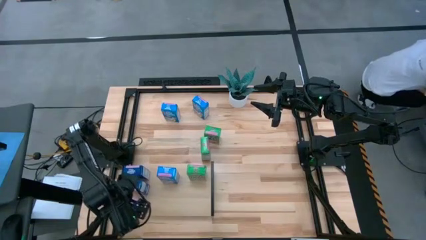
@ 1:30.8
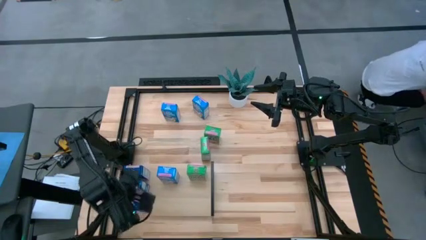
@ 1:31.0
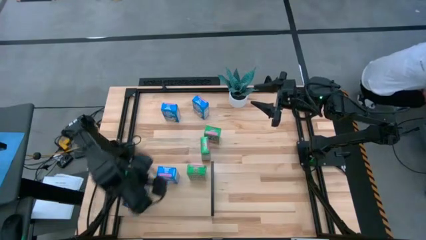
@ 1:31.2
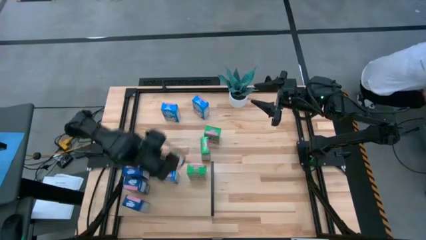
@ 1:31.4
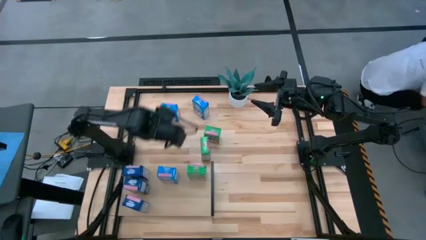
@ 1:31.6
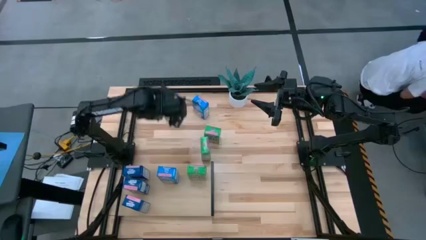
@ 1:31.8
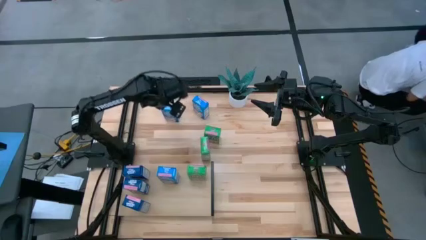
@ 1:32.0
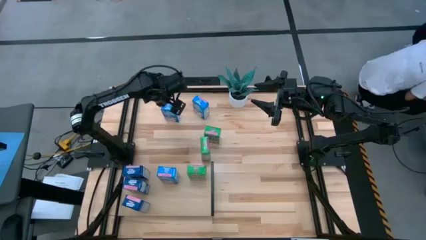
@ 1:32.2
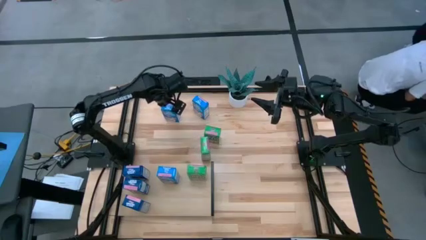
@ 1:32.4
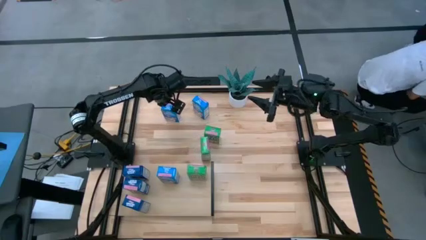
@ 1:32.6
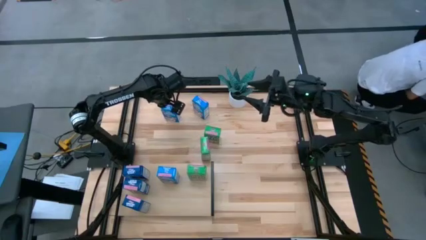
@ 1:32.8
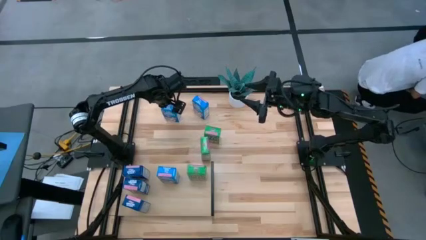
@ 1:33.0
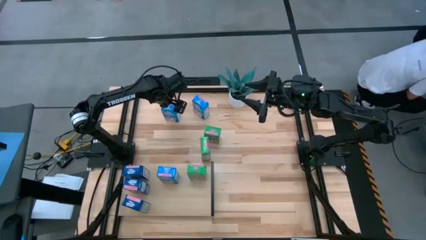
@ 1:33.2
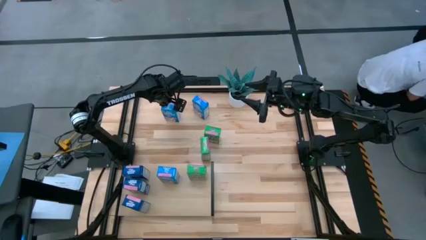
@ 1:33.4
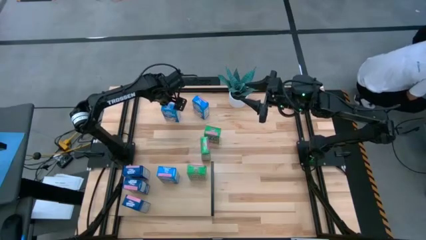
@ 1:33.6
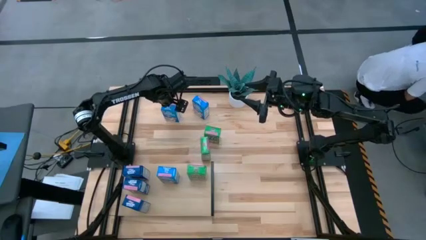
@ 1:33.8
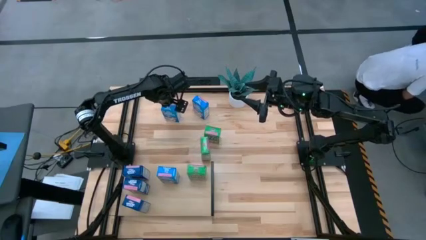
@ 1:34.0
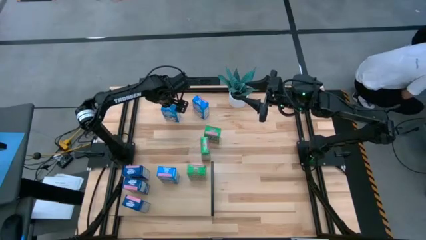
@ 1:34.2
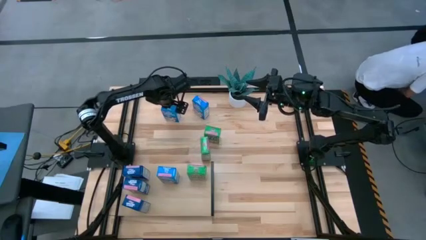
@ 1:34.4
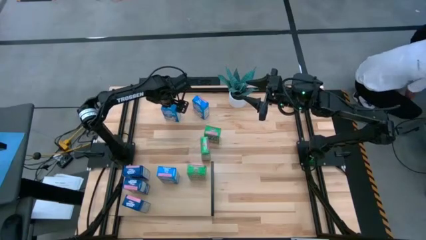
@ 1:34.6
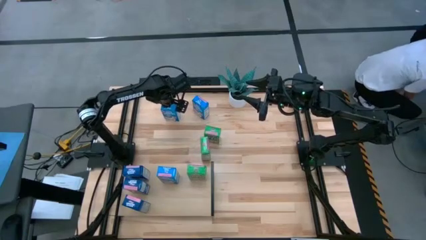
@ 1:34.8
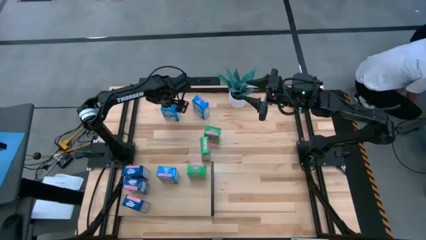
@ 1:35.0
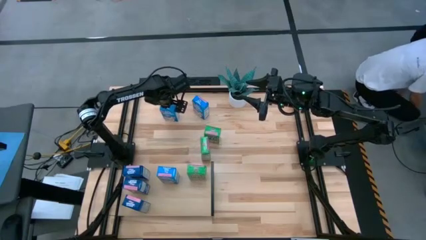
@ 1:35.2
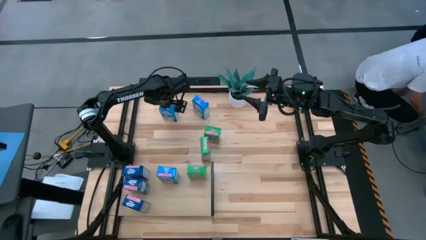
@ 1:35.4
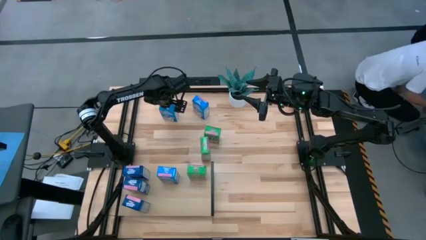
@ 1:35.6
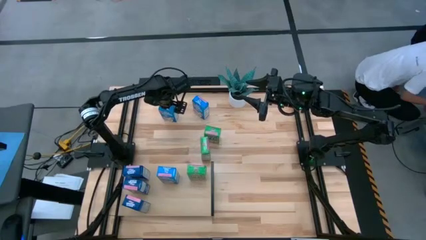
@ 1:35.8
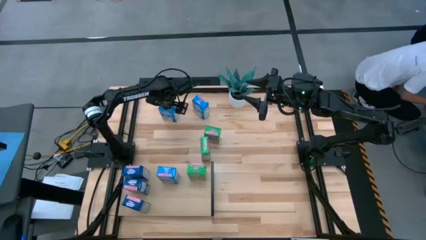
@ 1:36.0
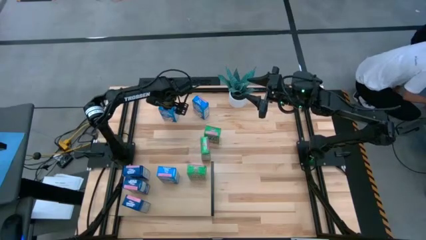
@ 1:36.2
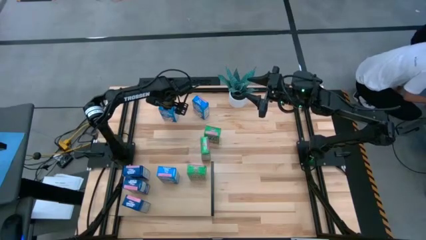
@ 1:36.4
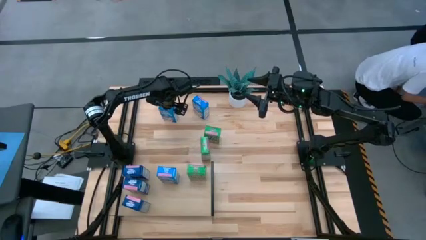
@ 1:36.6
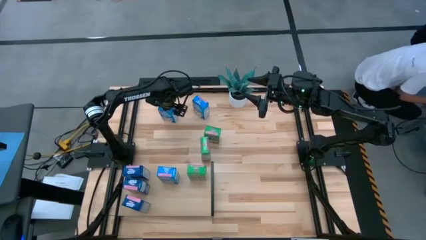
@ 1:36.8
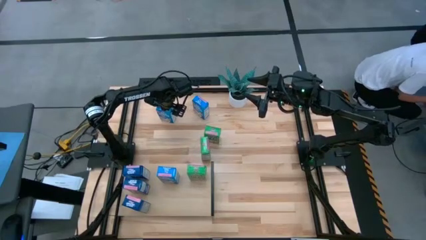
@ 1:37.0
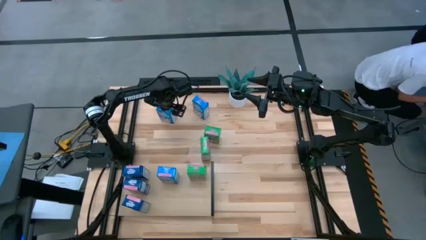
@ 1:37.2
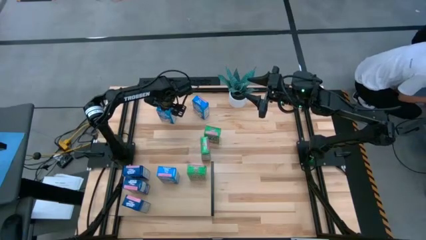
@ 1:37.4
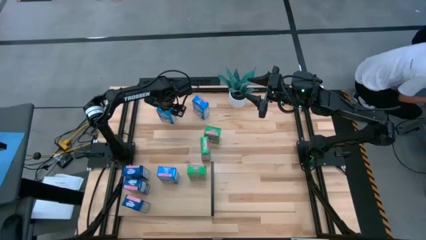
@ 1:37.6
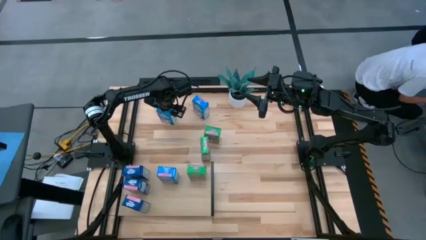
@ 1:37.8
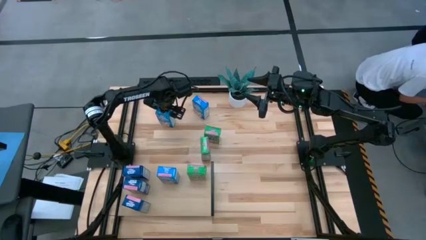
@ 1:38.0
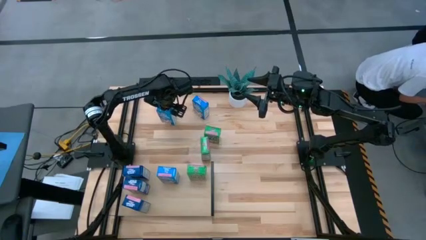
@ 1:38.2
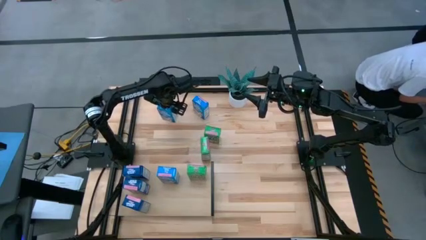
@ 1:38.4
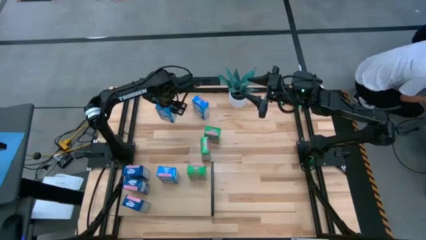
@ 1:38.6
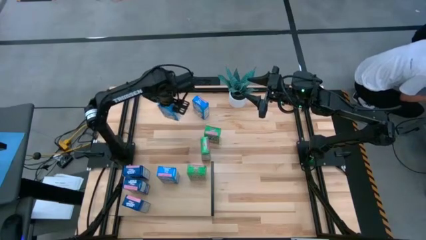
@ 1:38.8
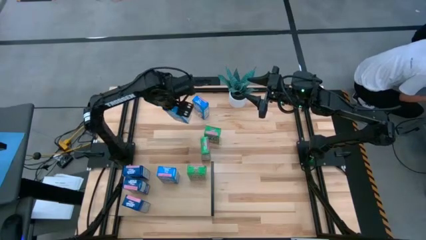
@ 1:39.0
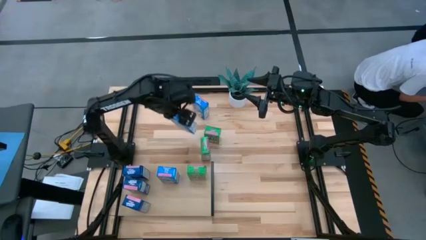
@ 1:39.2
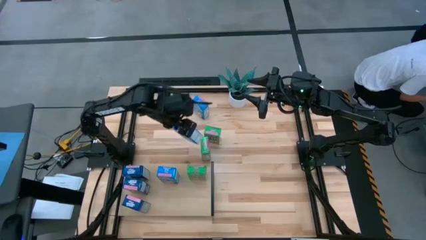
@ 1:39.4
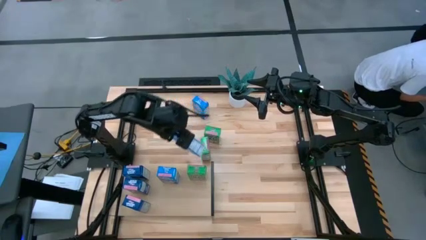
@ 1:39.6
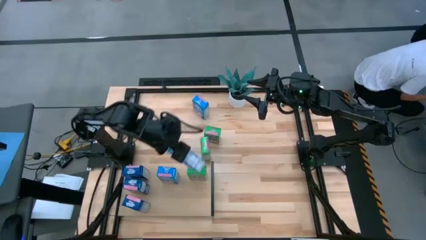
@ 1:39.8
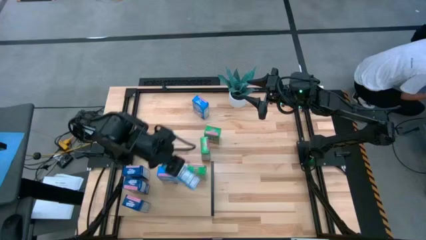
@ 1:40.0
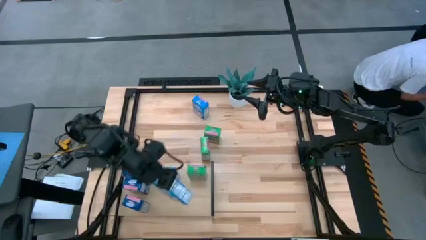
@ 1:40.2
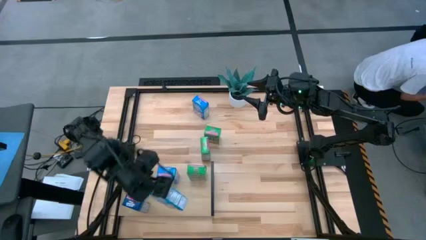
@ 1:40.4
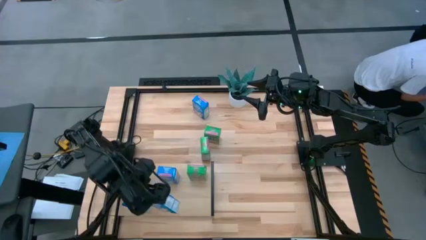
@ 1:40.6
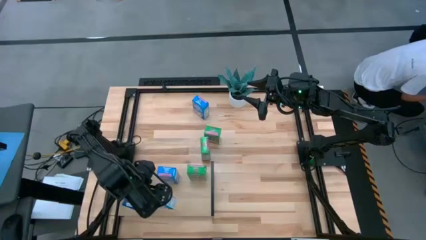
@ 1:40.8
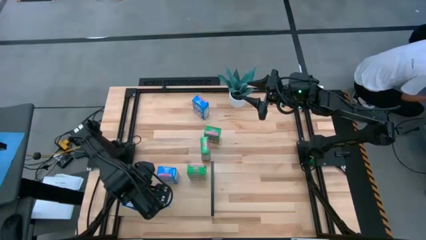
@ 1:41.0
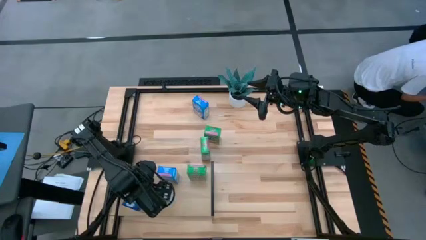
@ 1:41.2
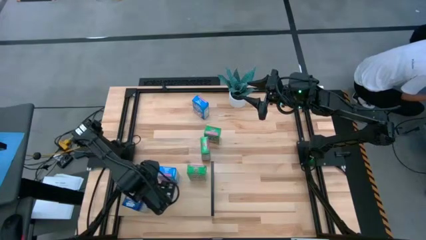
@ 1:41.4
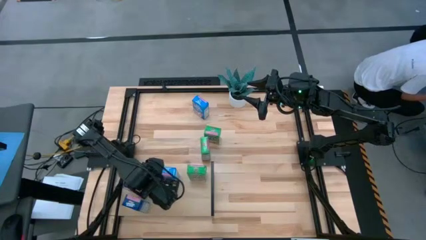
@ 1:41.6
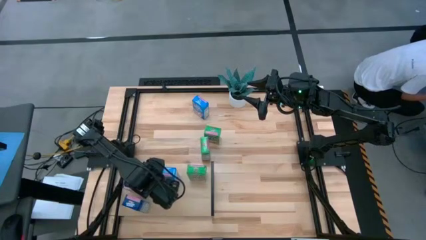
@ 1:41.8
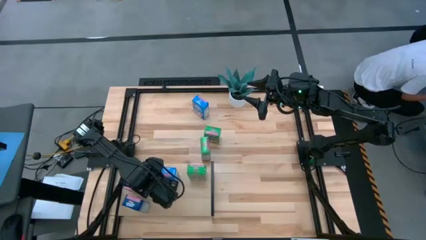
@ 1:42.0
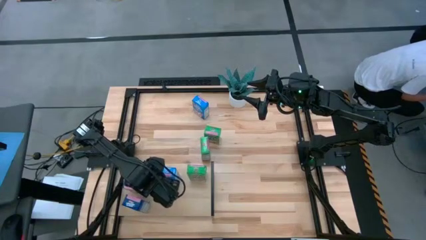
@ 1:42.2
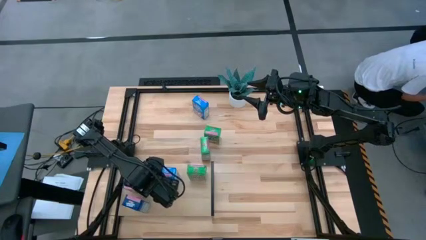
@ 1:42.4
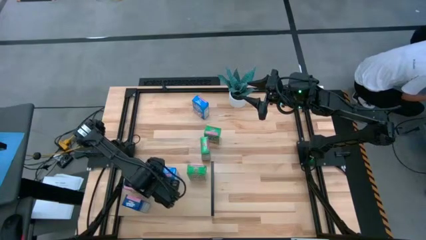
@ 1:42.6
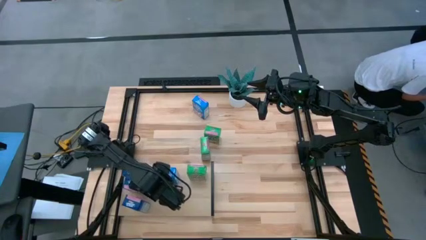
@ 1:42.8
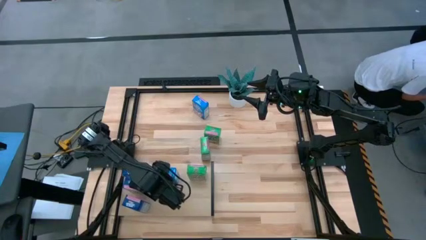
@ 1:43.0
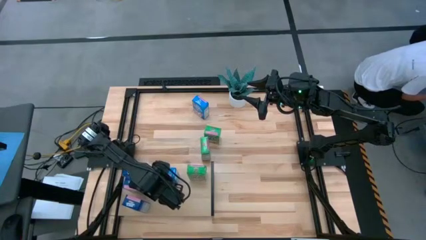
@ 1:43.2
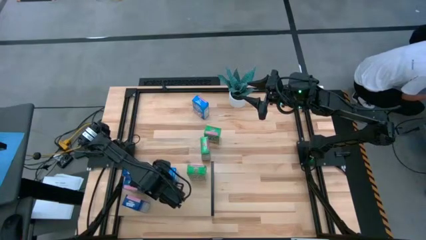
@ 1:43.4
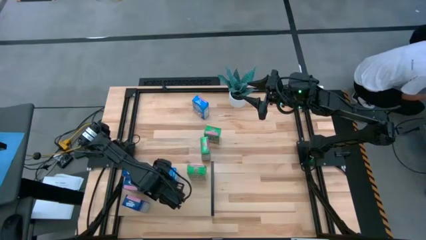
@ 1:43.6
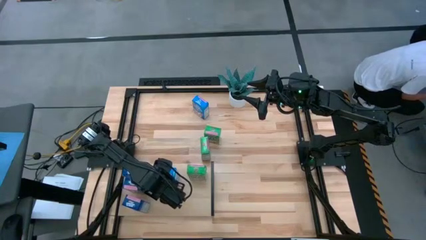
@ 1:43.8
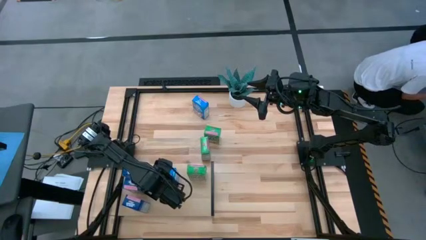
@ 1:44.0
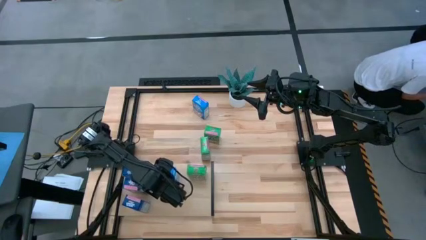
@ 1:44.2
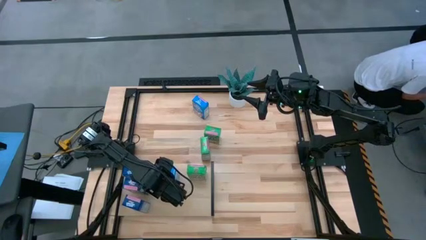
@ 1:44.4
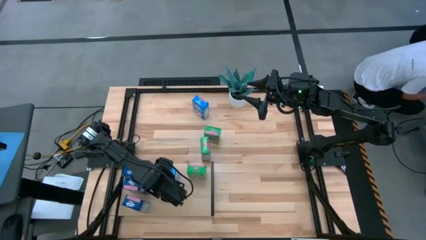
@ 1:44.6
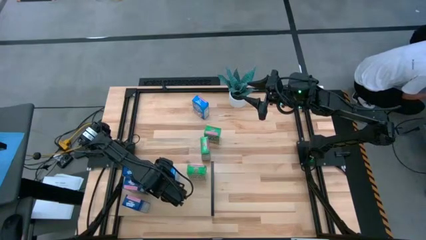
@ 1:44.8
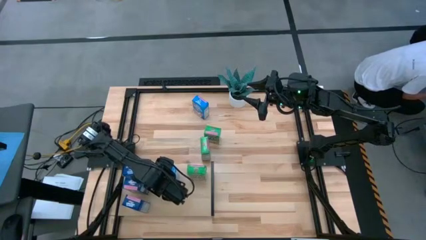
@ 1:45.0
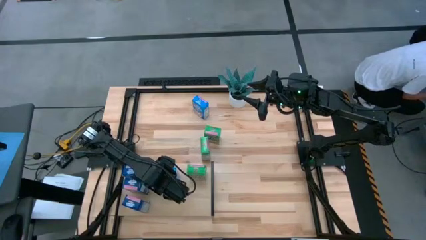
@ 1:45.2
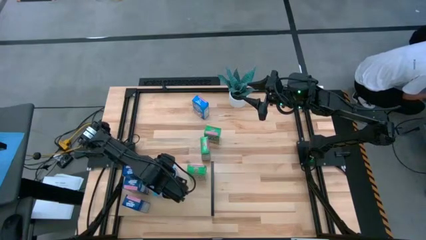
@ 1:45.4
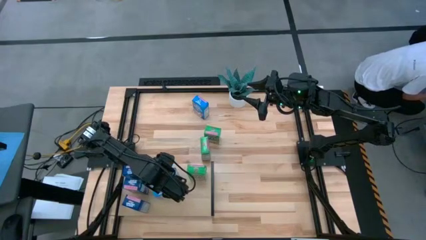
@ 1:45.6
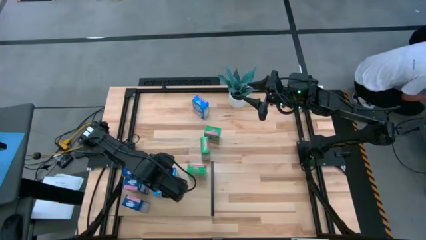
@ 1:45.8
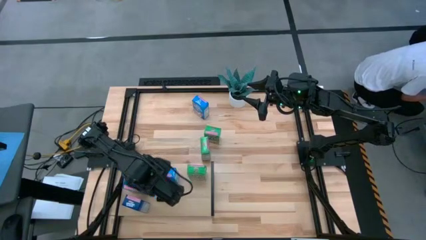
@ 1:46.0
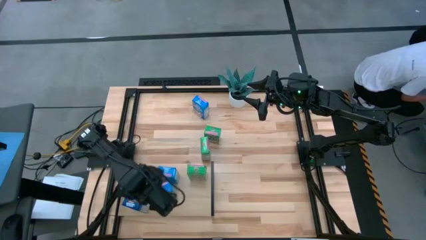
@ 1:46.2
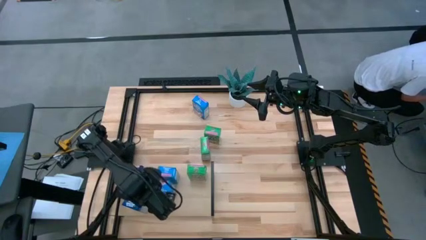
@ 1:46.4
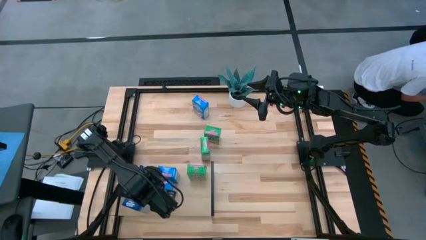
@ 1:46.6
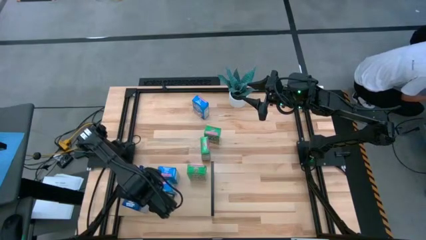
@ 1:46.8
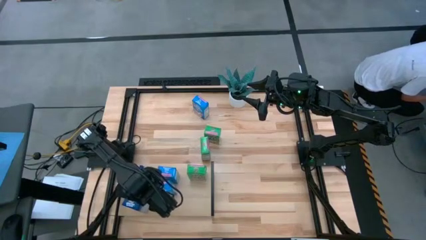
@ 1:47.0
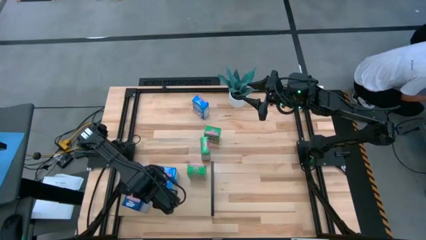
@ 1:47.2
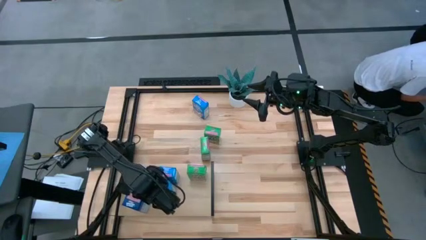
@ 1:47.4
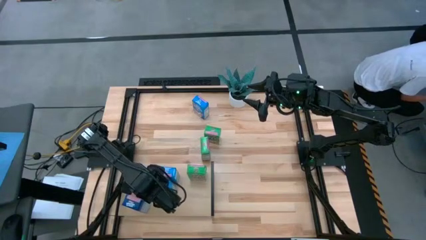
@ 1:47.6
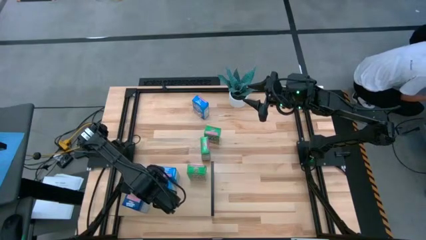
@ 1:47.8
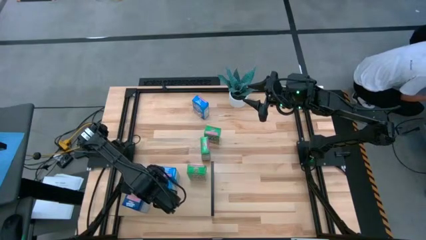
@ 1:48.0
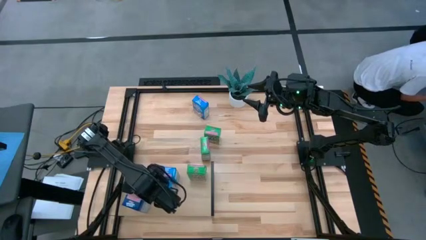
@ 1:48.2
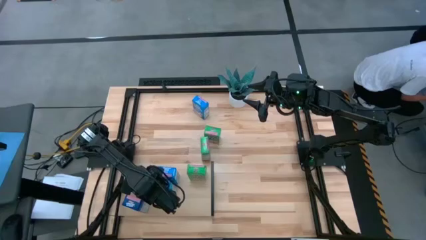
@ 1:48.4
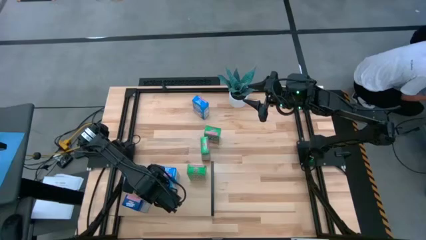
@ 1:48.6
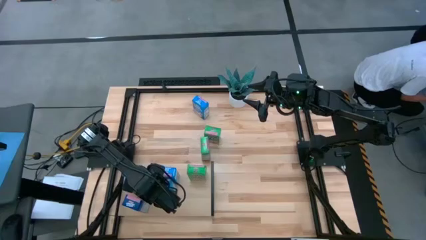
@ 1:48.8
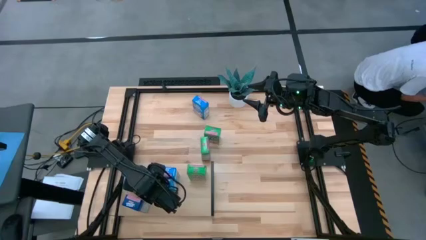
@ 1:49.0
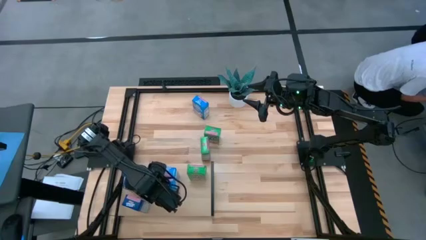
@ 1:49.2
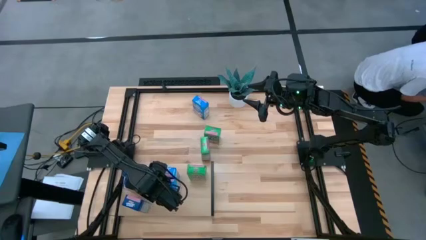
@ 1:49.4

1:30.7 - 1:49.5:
Task: Stack cereal on shelf
Put the left light blue cereal box on the shelf aligned with the other light blue cereal box
